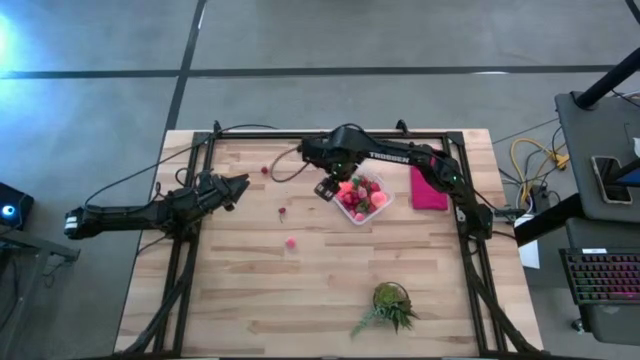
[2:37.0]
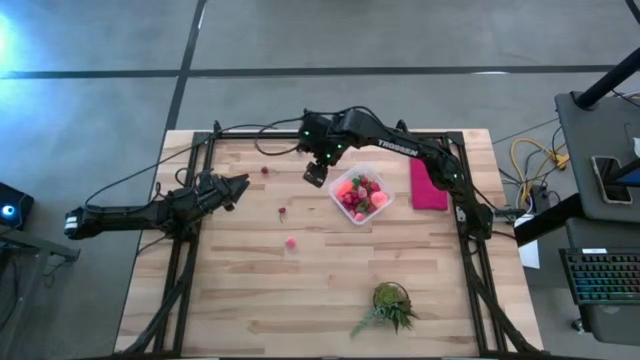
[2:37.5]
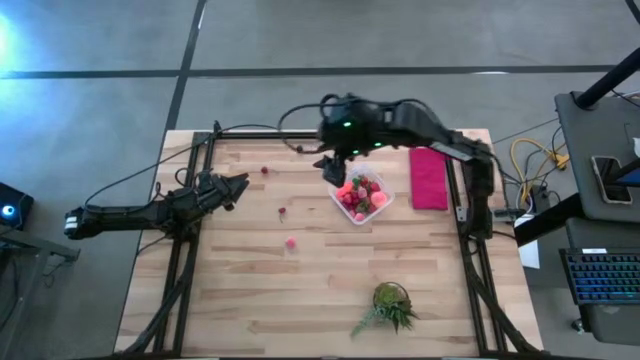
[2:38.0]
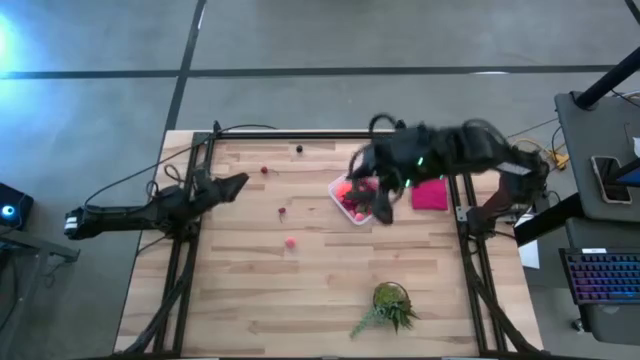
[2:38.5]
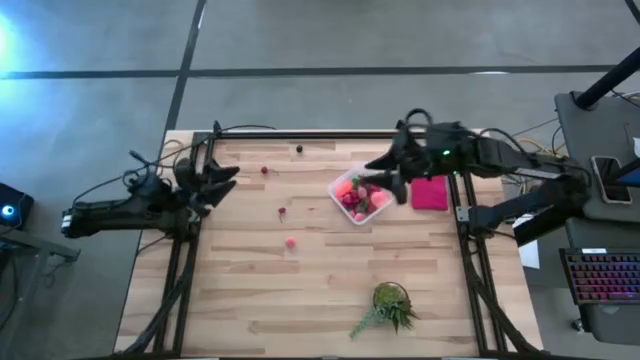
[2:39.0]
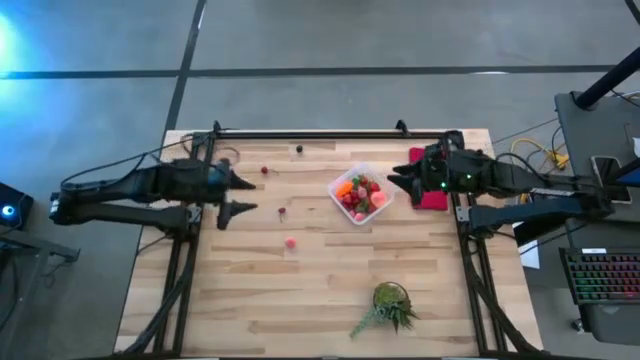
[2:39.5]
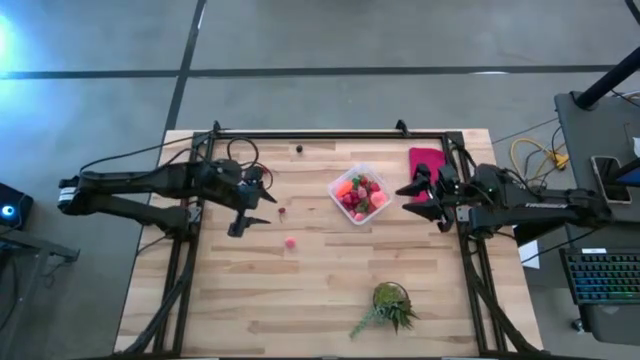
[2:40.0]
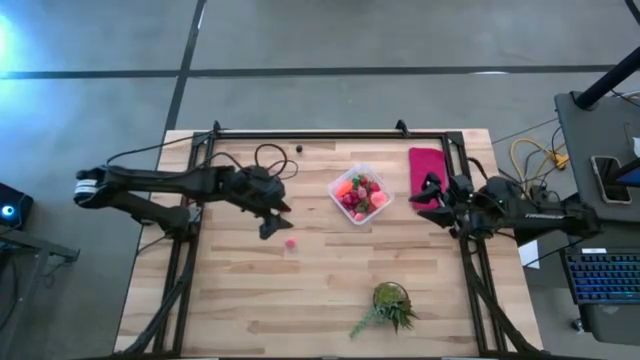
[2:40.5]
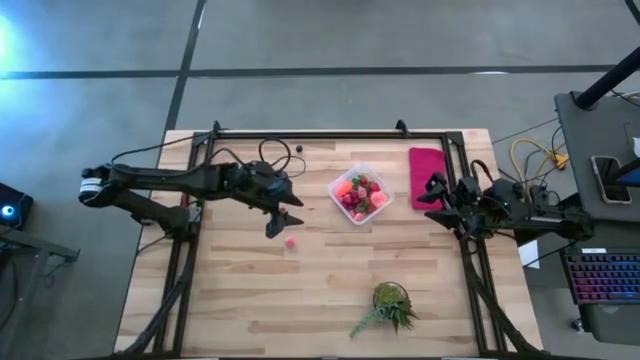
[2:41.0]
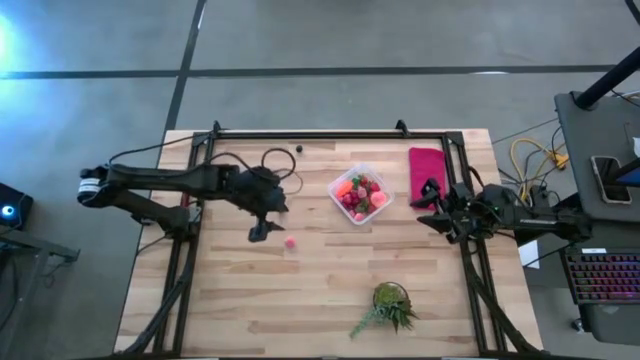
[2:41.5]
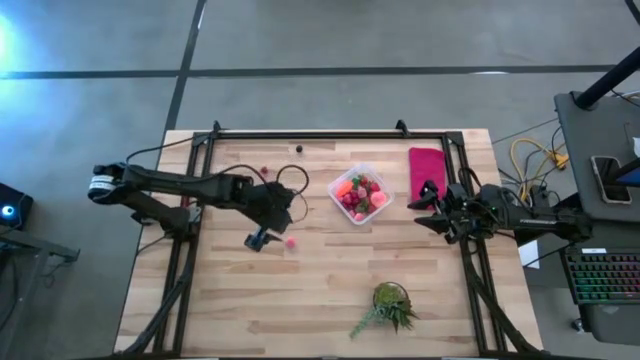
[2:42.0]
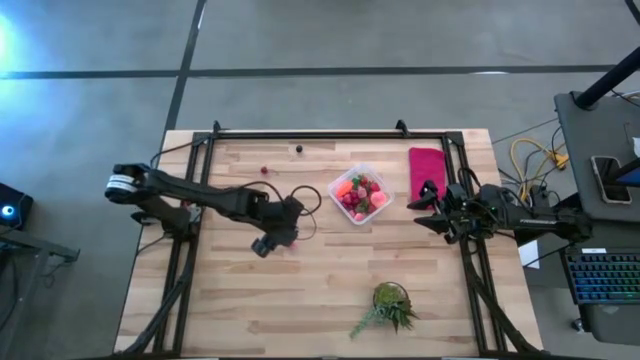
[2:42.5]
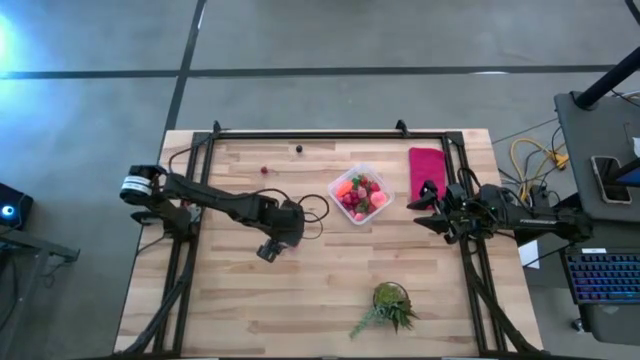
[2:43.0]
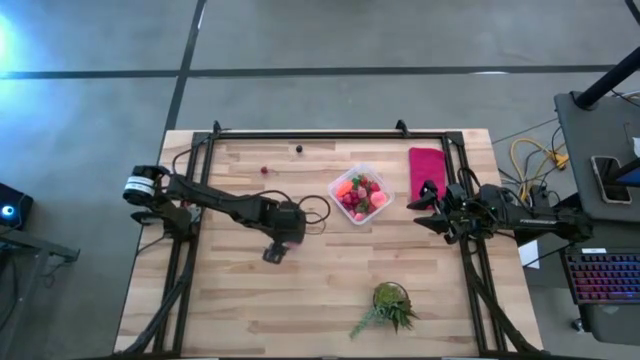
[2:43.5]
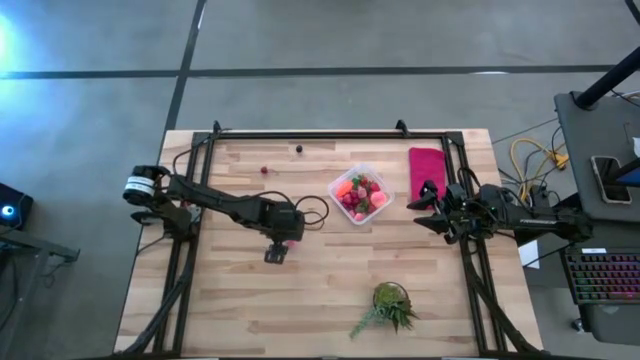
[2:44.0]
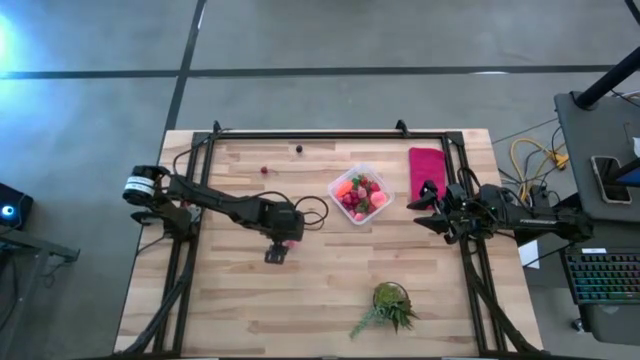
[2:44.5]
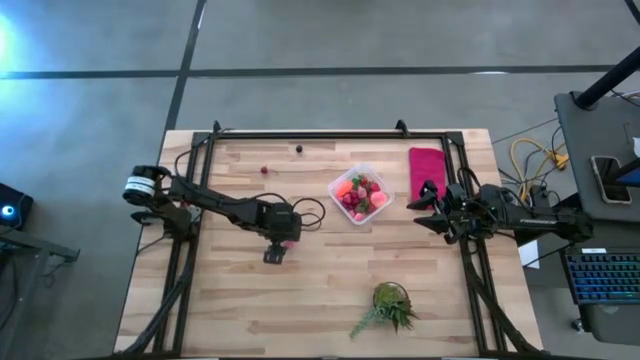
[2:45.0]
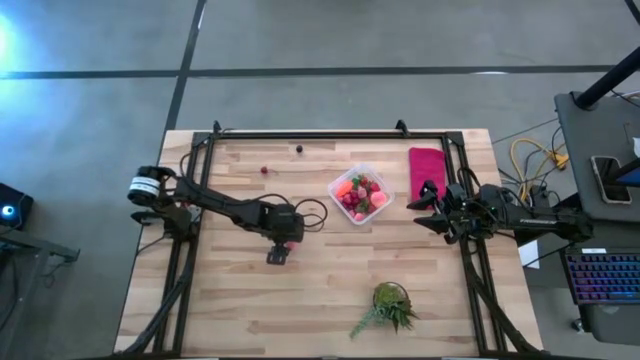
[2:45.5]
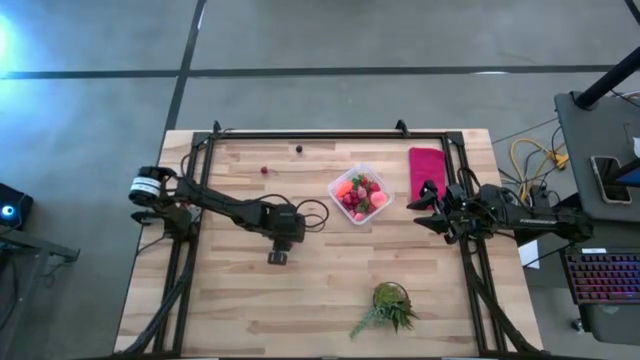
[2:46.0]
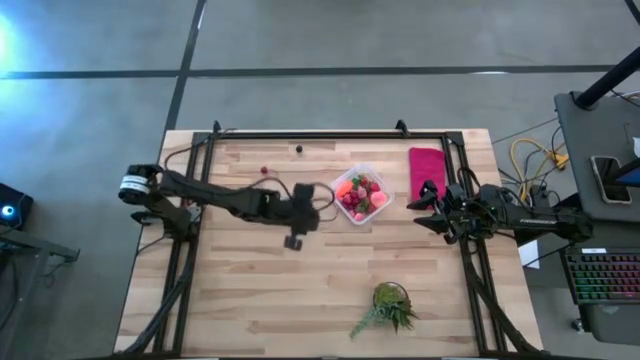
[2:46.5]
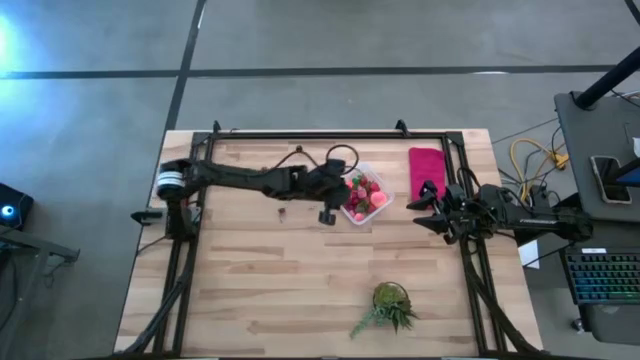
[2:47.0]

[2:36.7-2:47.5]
Task: Pick and placing Produce into tupperware
Put the pink apricot into the transparent container

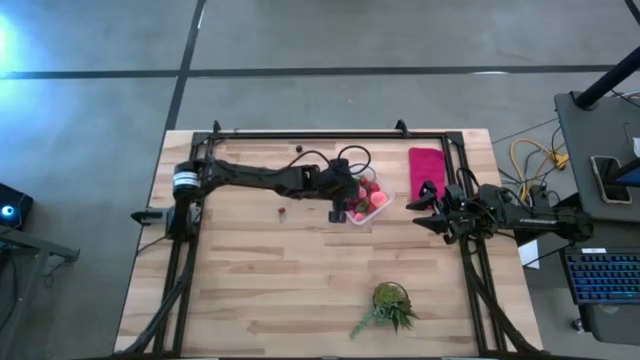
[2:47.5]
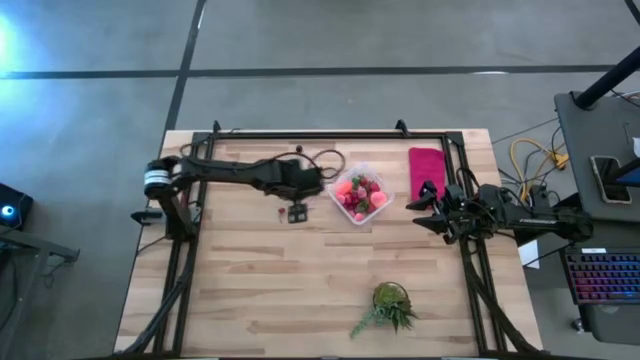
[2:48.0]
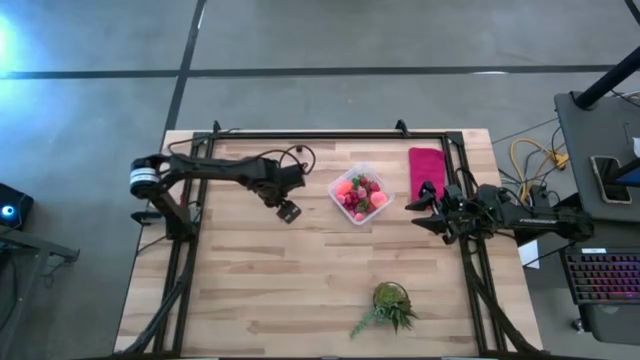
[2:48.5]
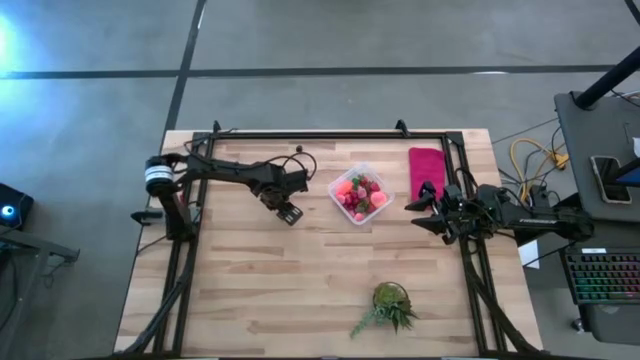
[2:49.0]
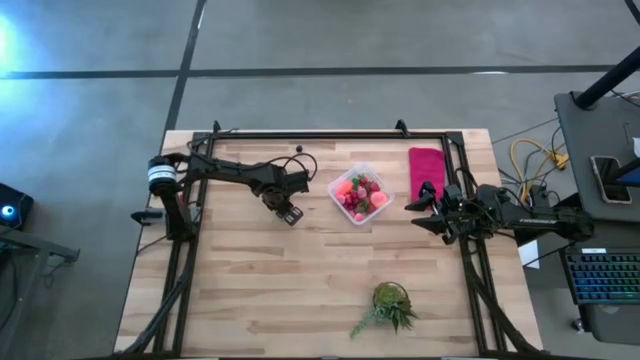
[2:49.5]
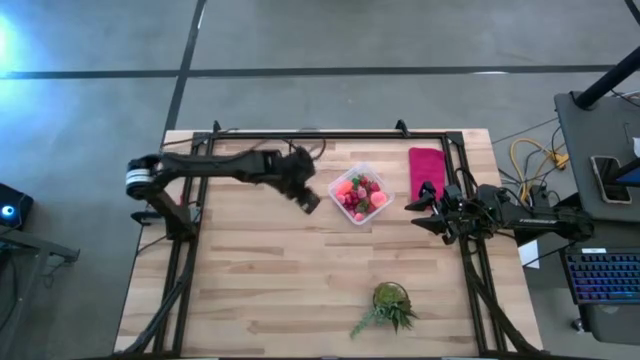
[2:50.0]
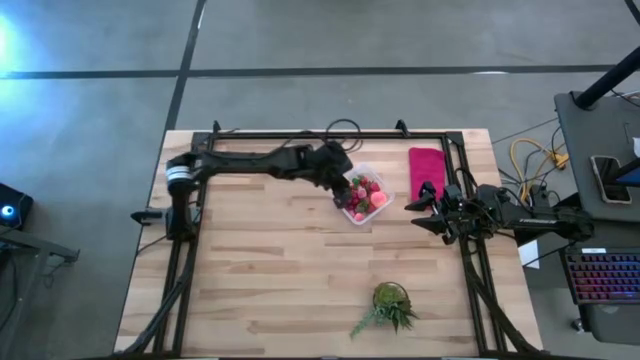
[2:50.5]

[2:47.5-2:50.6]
Put the red cherry into the transparent container

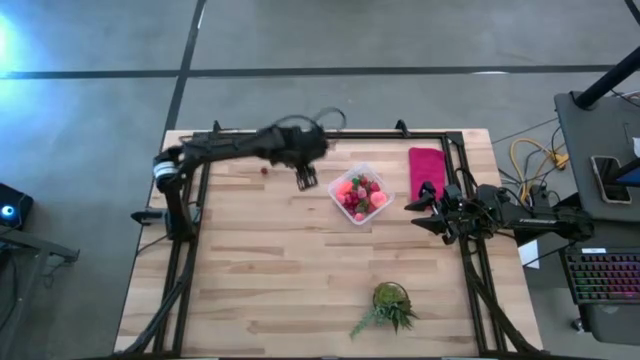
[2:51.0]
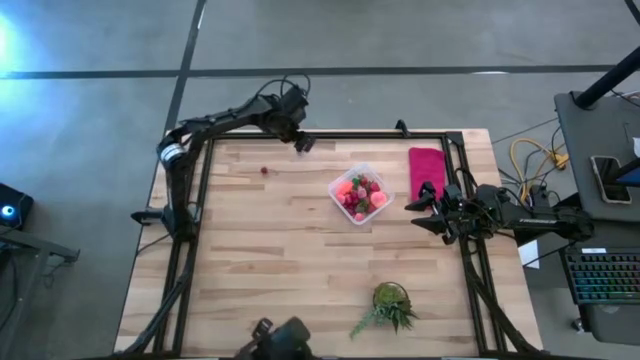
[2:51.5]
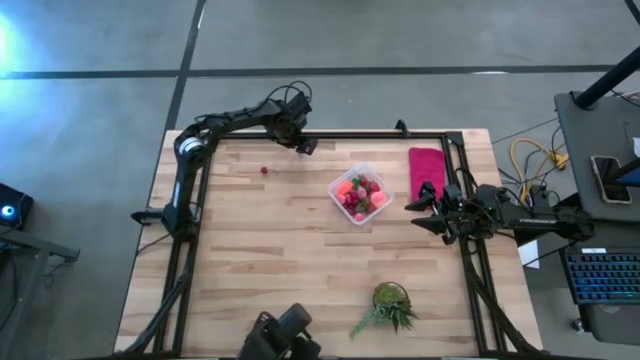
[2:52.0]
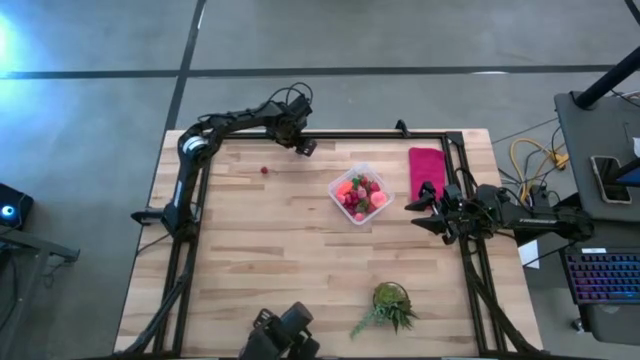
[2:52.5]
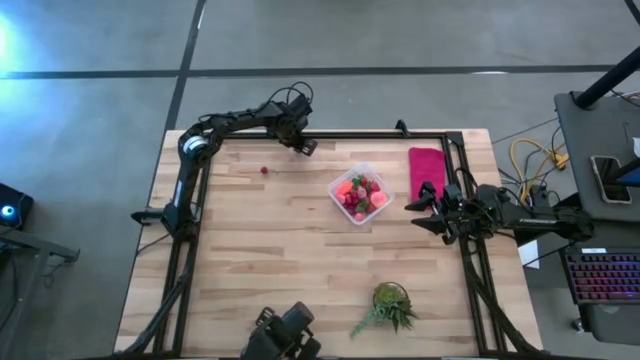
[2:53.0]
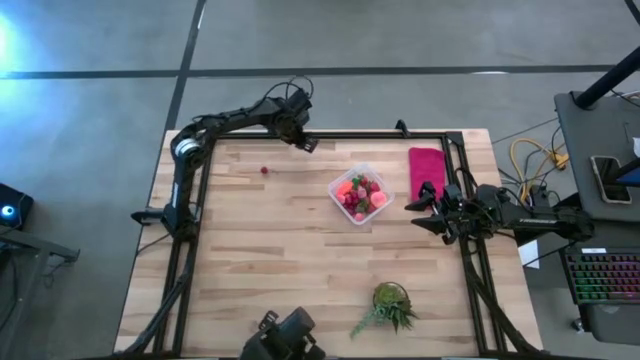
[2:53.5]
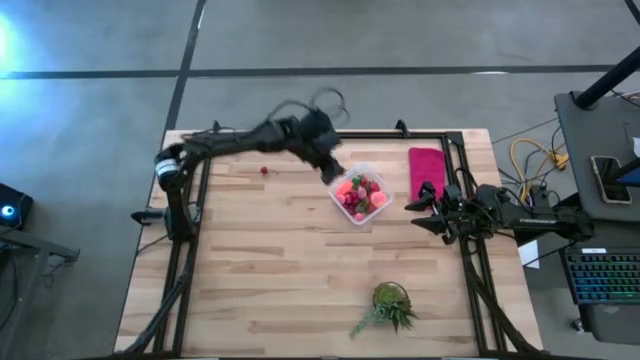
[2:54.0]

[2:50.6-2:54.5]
Put the black plum into the transparent container

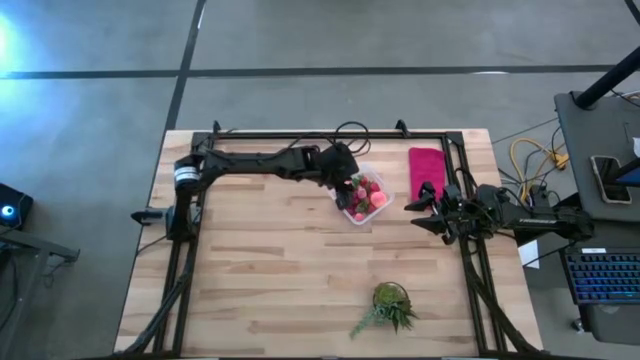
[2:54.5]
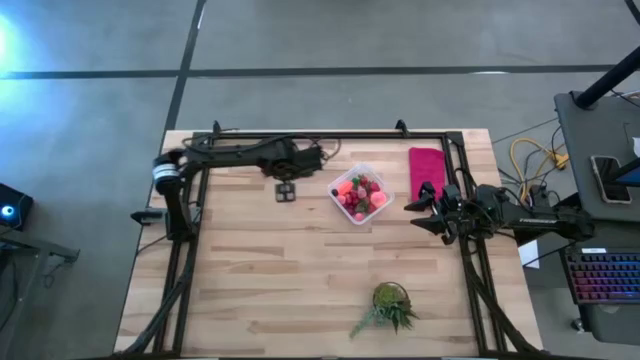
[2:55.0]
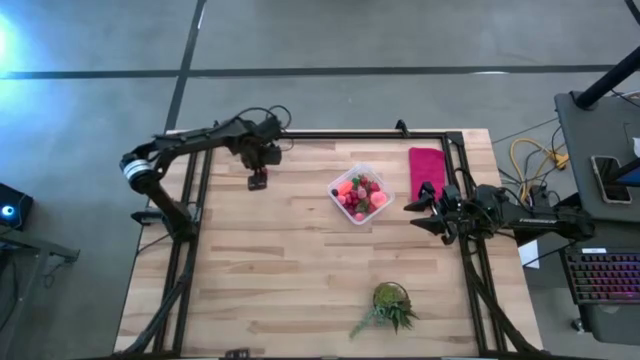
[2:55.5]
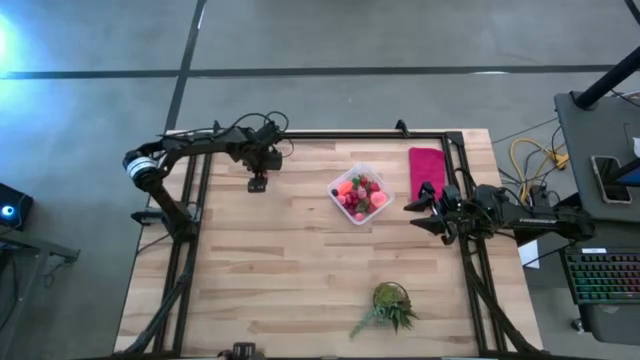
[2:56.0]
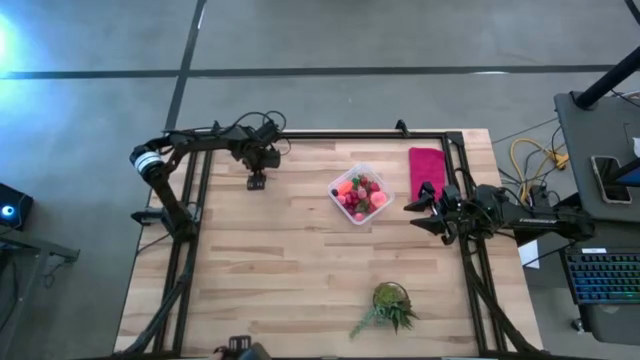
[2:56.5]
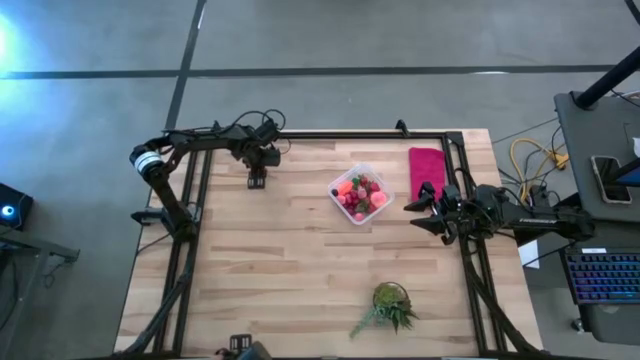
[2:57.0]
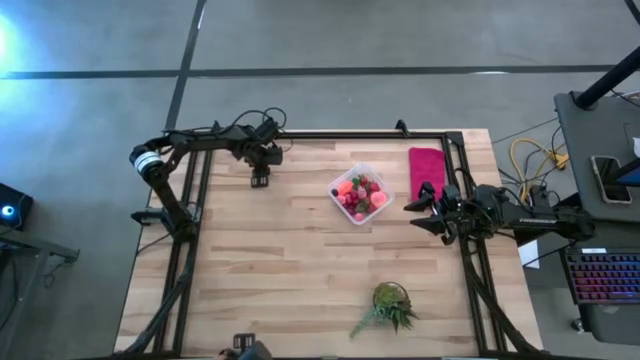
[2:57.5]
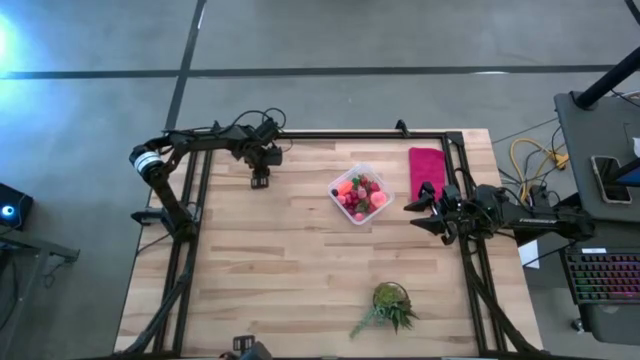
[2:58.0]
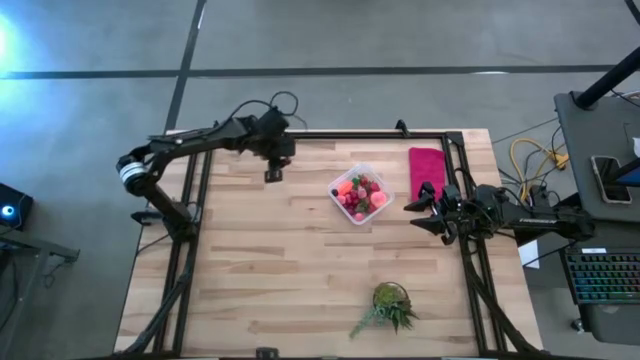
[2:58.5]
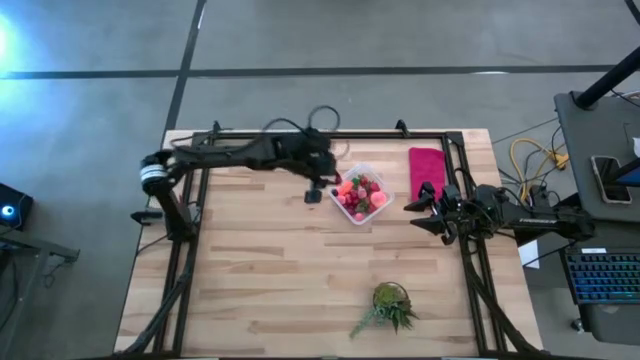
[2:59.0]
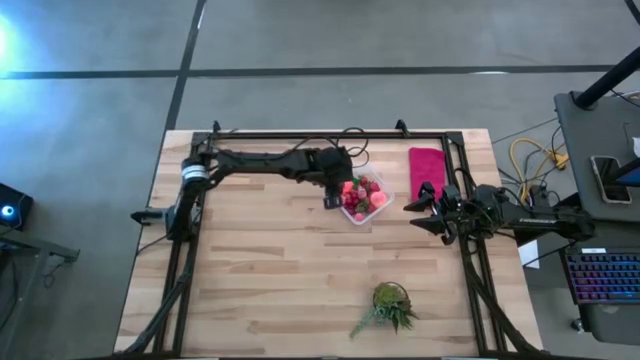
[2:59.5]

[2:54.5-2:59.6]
Put the red cherry into the transparent container
